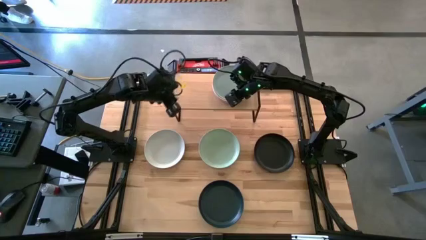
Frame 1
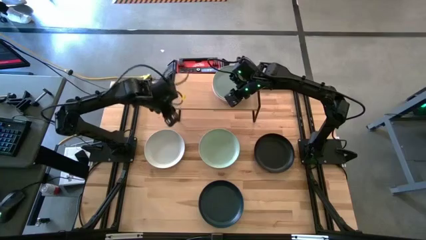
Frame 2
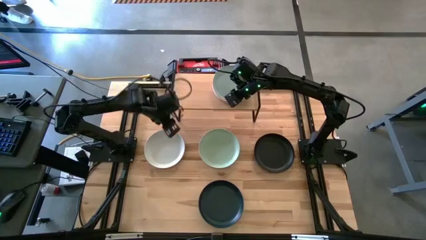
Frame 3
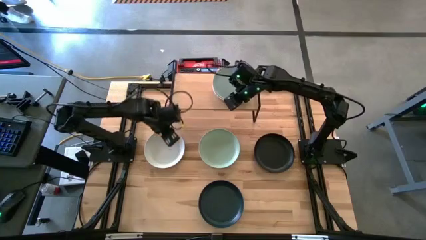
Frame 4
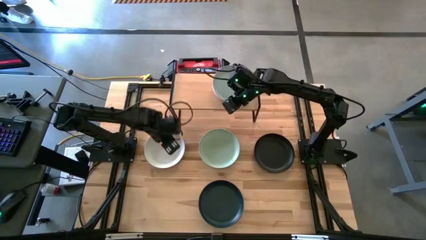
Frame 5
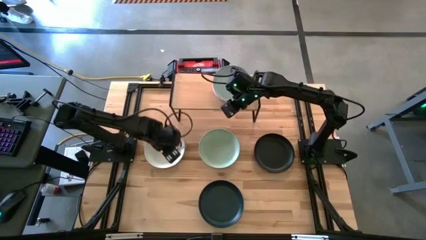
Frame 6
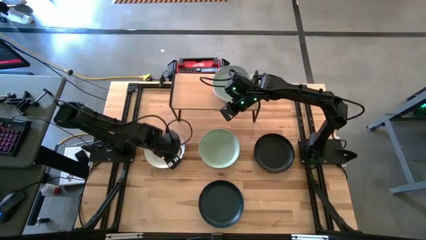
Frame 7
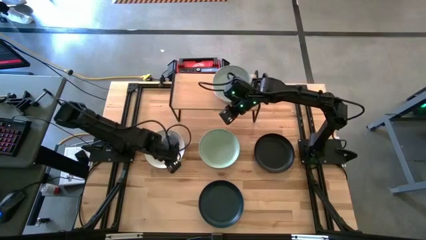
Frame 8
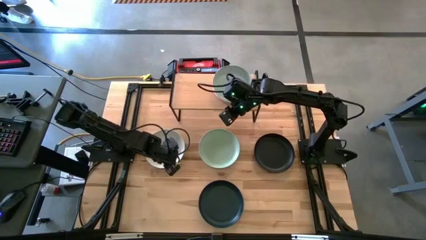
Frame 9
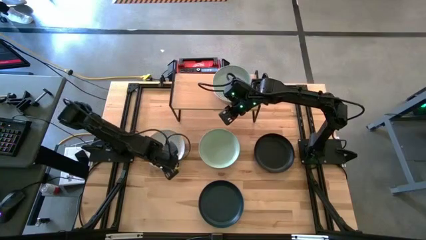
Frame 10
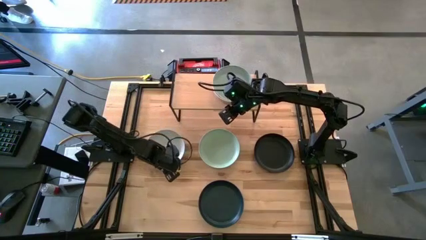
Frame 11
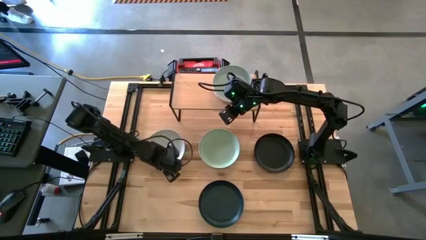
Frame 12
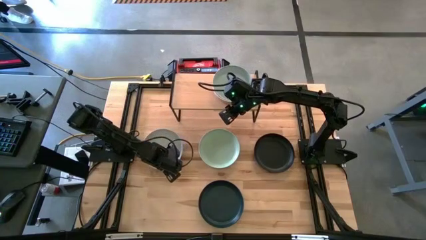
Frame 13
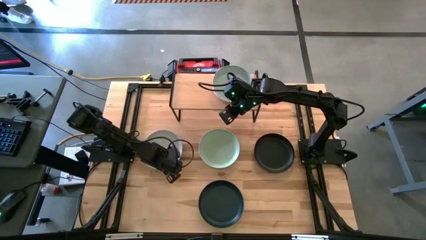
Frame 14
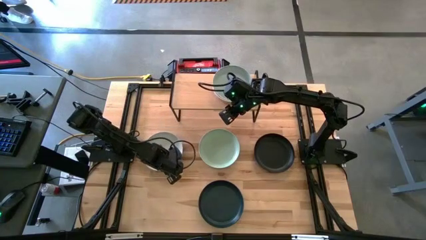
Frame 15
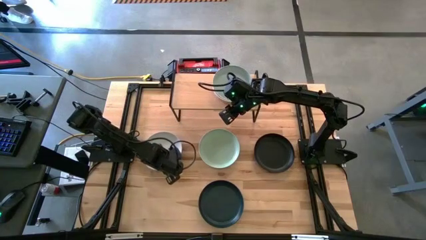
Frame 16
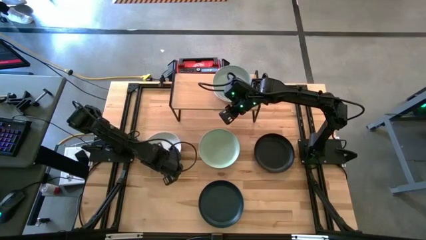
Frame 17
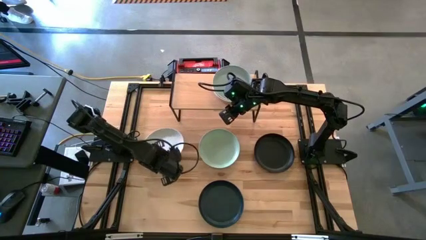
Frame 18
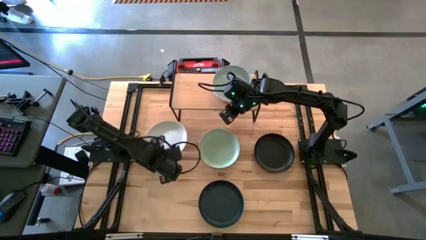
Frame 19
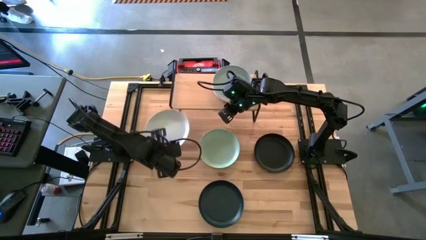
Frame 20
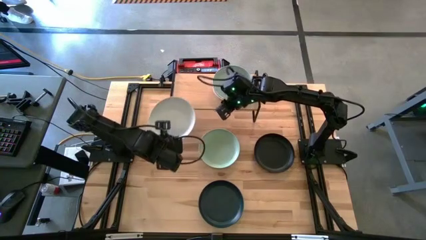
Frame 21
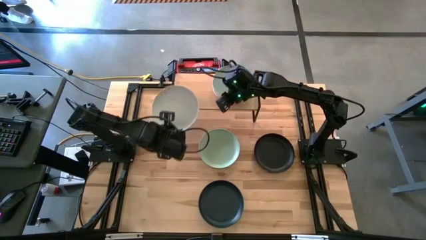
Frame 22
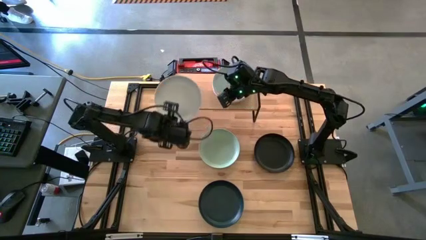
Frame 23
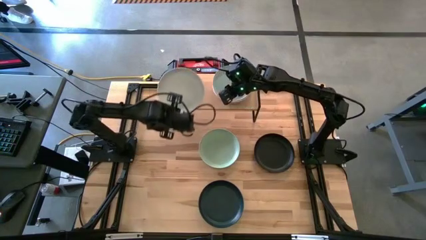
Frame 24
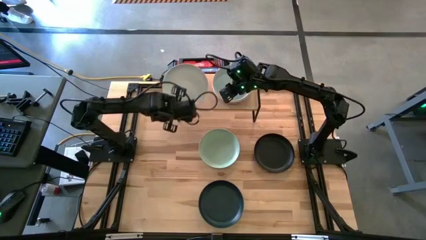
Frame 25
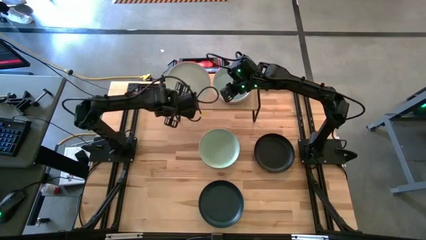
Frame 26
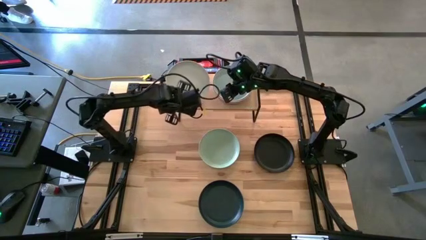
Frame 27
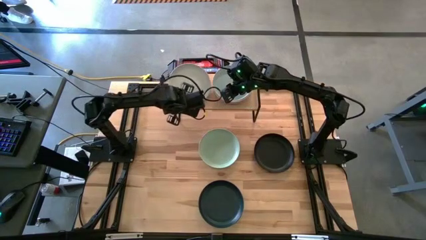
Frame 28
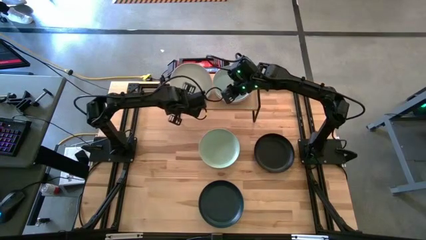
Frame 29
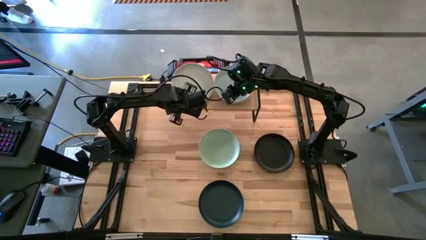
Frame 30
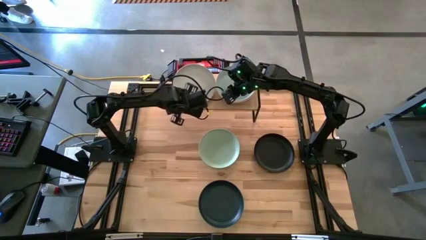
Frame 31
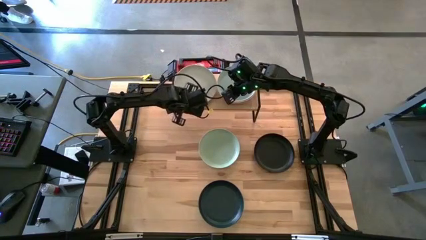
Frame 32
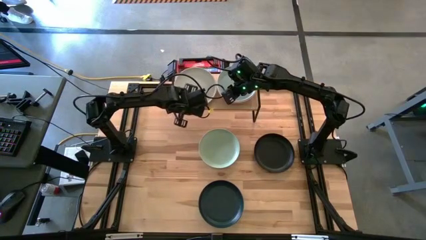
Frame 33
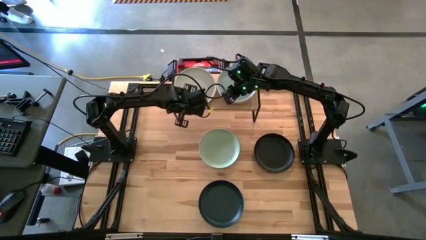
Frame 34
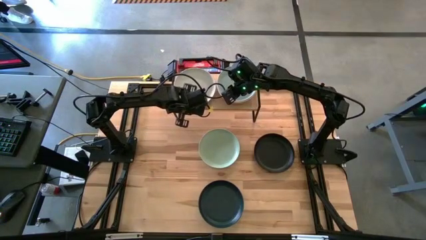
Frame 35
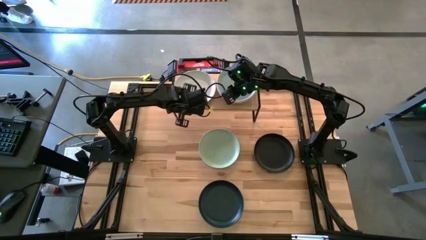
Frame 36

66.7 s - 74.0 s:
Task: Place and stack plates onto a shelf
Put the white plate on the shelf

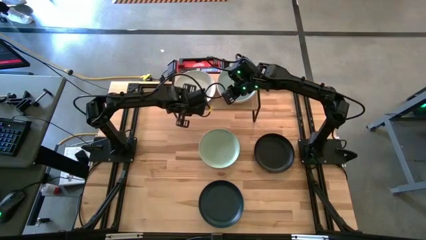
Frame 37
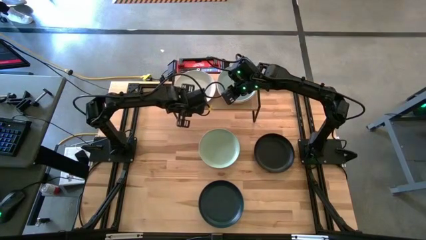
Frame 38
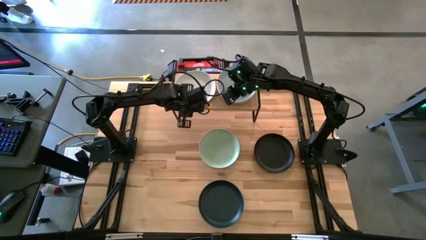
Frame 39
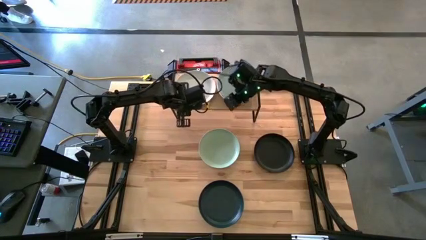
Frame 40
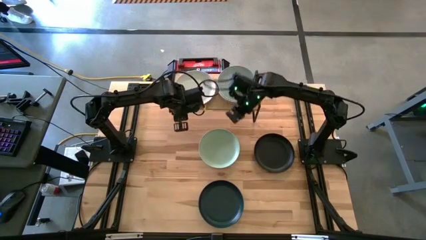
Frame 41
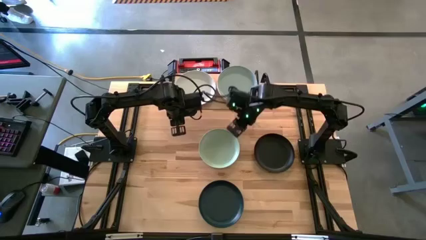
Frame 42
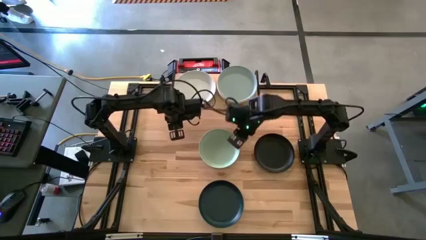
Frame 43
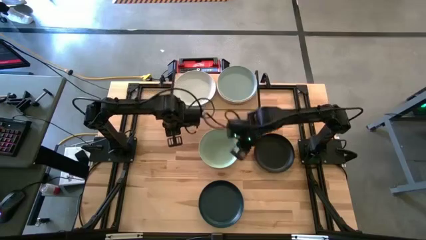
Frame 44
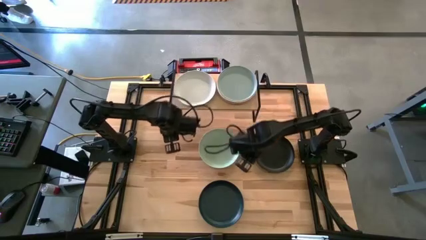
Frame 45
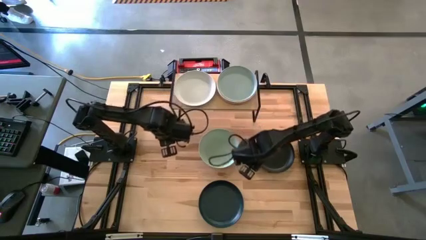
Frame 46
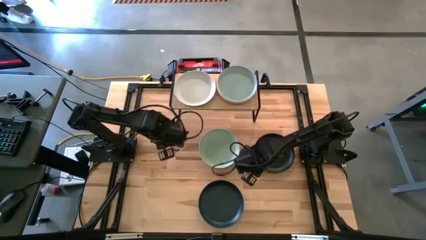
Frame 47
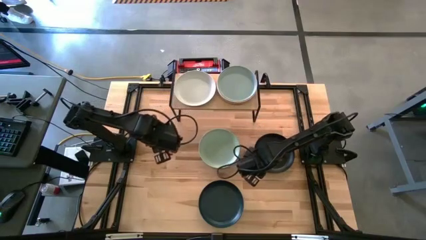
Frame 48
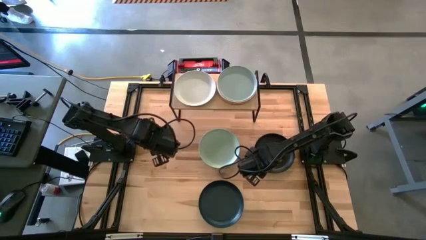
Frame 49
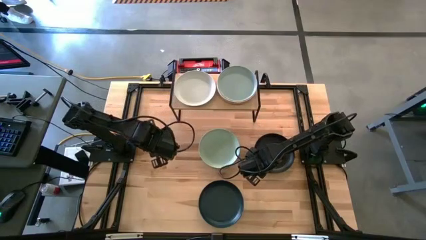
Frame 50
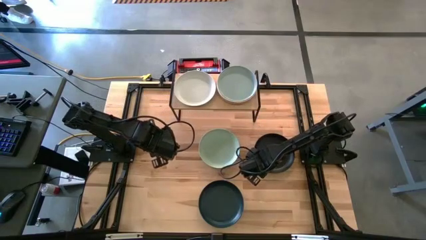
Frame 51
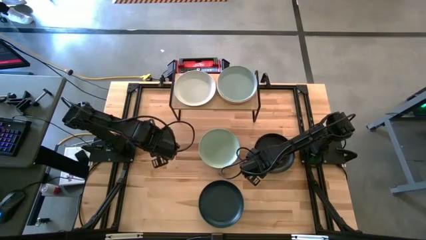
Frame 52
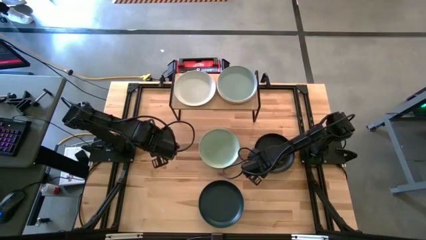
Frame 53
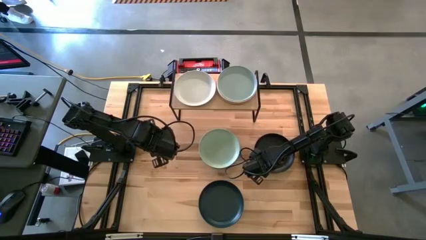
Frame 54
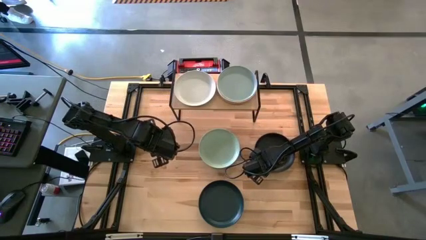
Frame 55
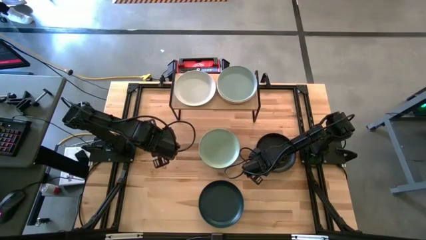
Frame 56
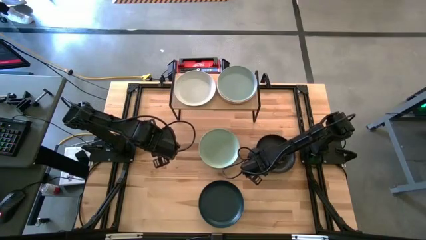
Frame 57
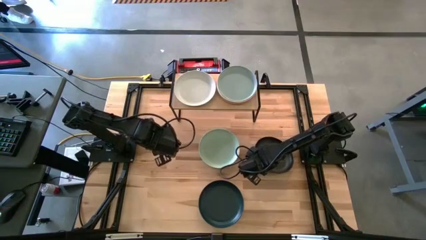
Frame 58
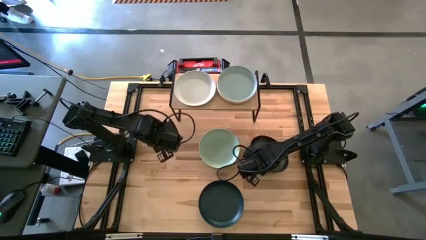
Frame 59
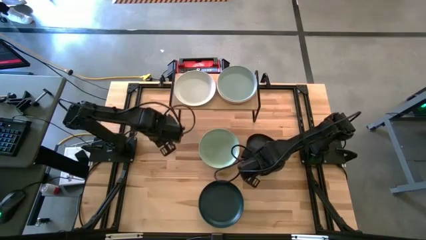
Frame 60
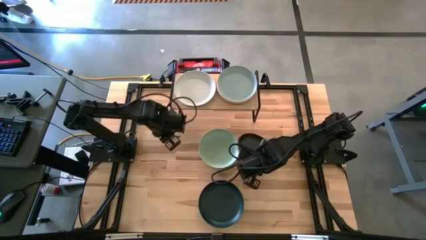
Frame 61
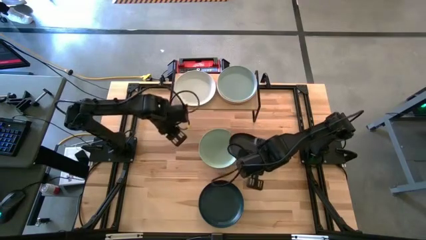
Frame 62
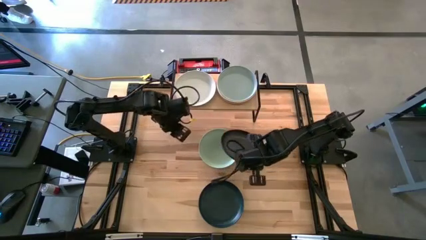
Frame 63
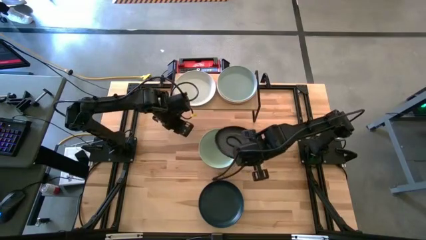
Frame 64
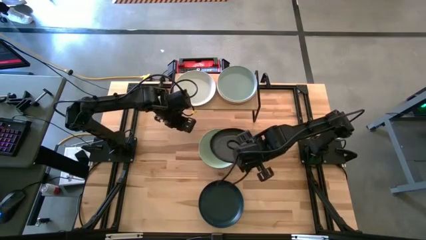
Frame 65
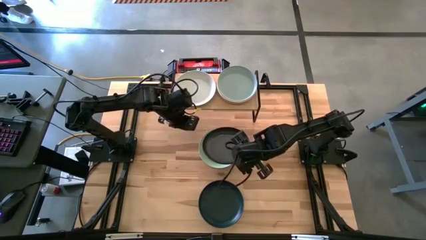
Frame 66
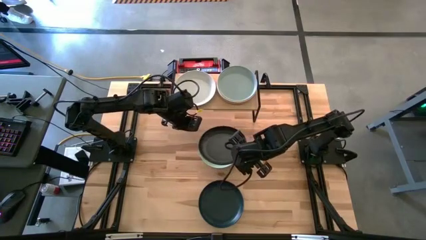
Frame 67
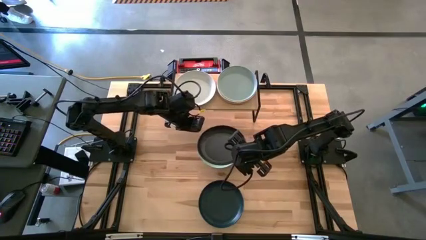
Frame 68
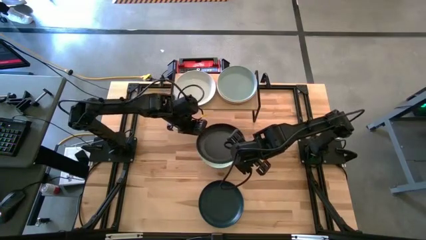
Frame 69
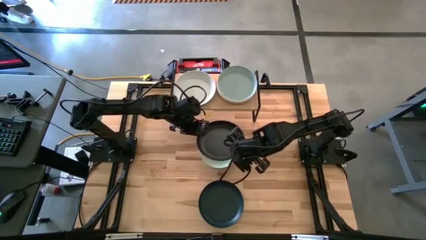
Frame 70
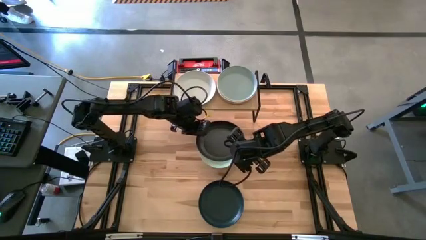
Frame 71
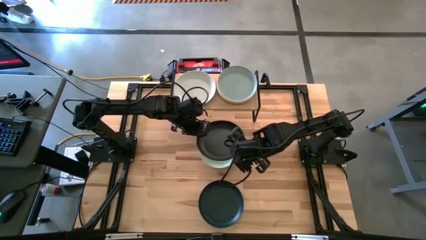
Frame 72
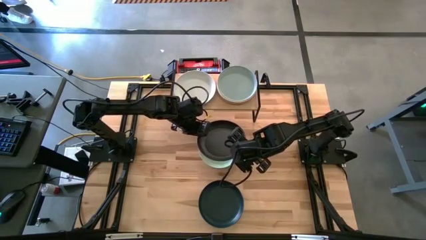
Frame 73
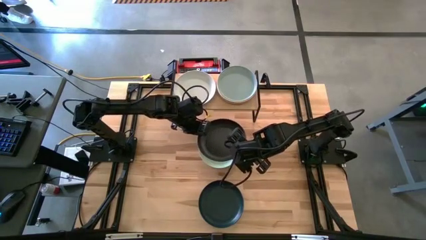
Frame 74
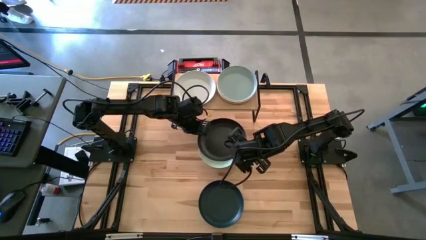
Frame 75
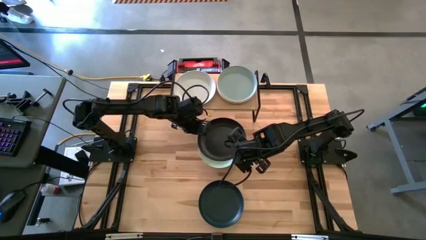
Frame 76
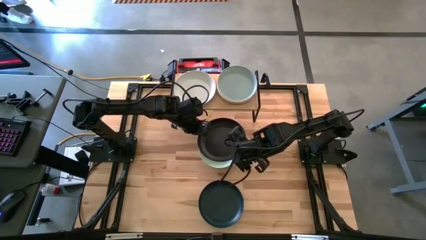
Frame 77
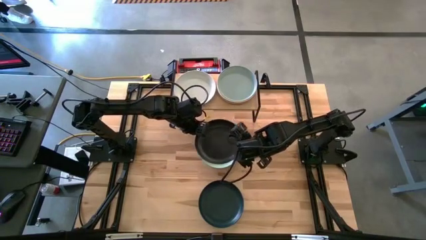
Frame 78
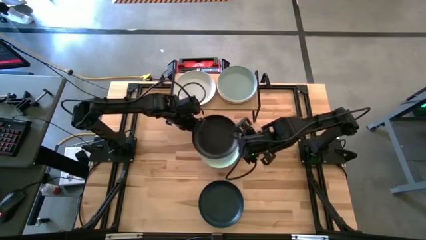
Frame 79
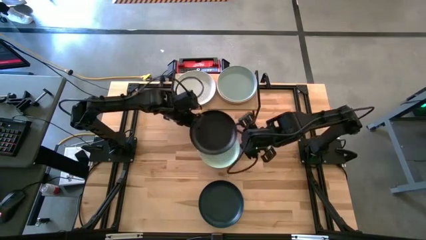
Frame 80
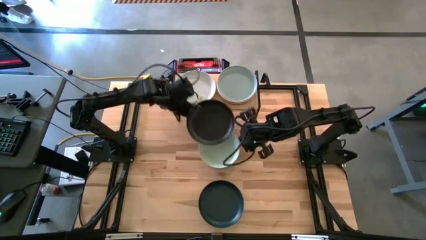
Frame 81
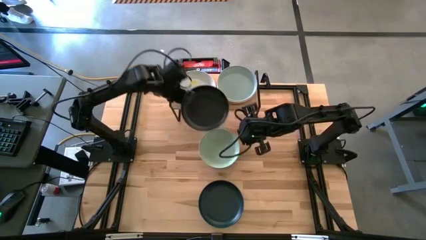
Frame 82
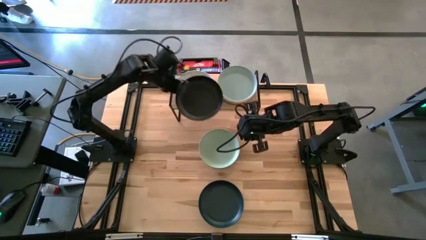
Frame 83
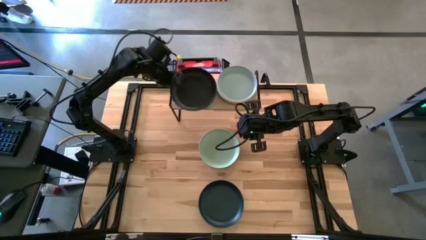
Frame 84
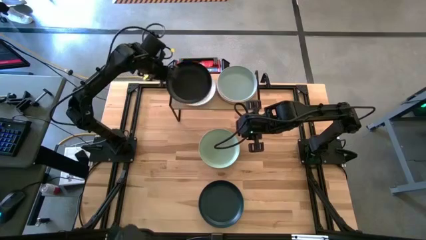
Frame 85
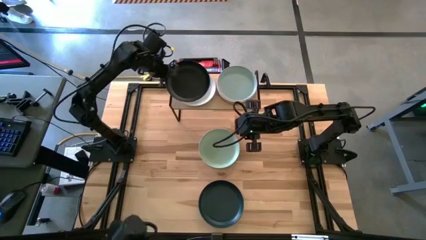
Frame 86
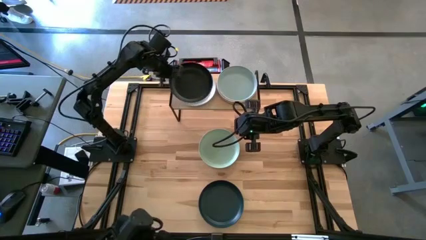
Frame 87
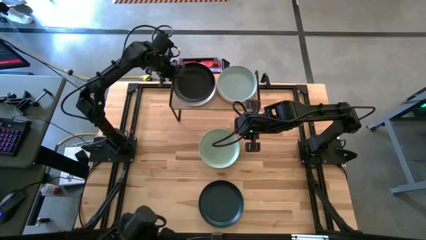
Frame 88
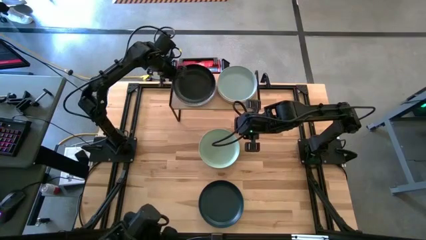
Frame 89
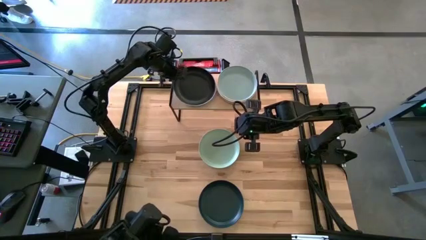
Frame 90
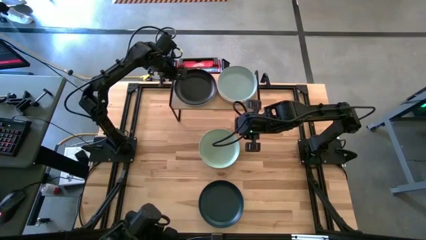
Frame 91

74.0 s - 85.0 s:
Stack the black plate on top of the white plate on the shelf
